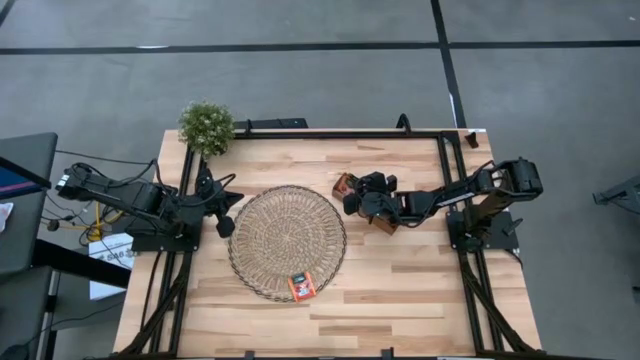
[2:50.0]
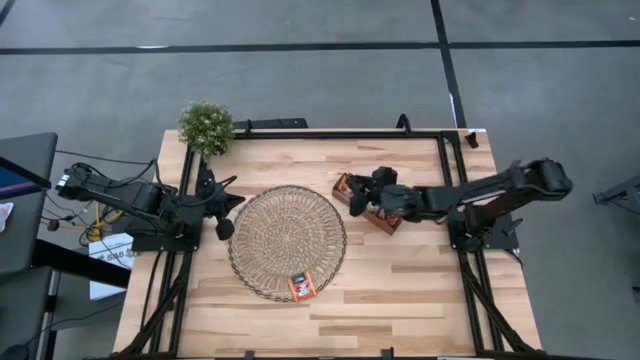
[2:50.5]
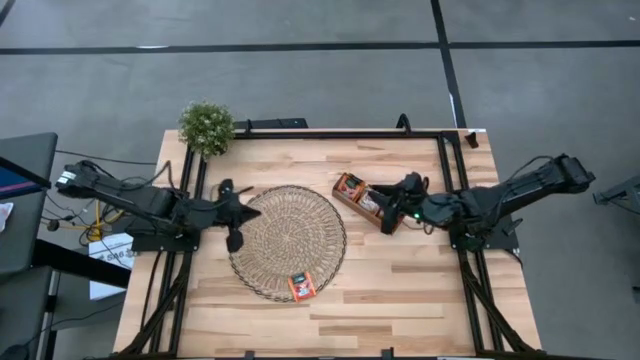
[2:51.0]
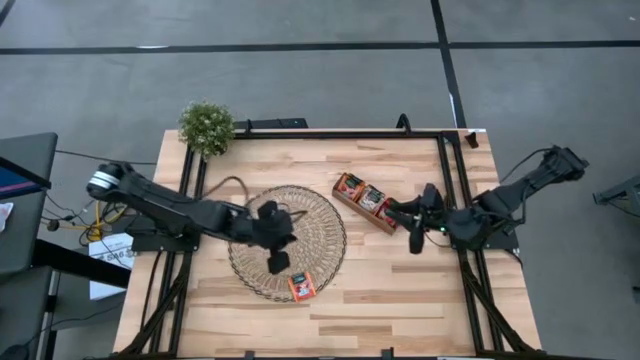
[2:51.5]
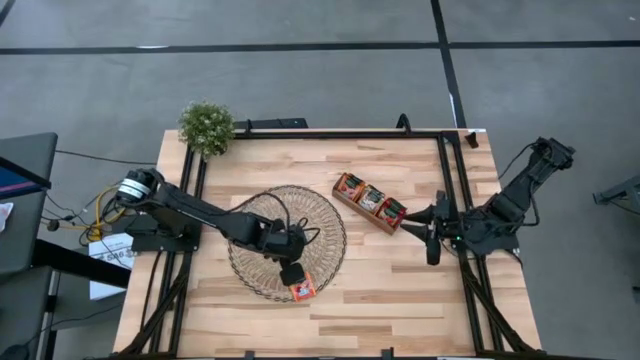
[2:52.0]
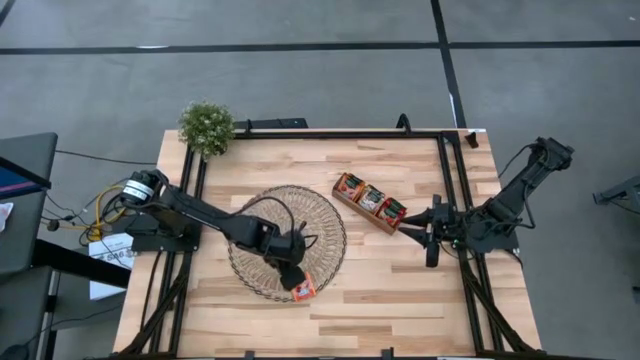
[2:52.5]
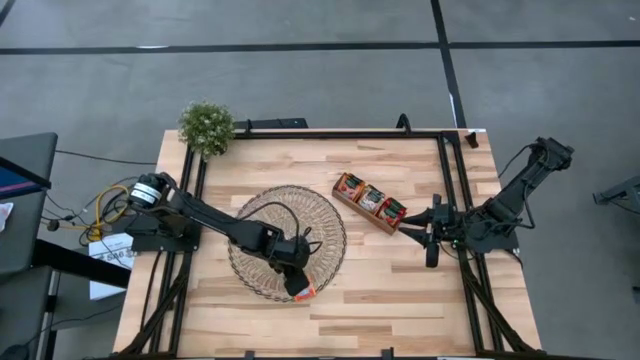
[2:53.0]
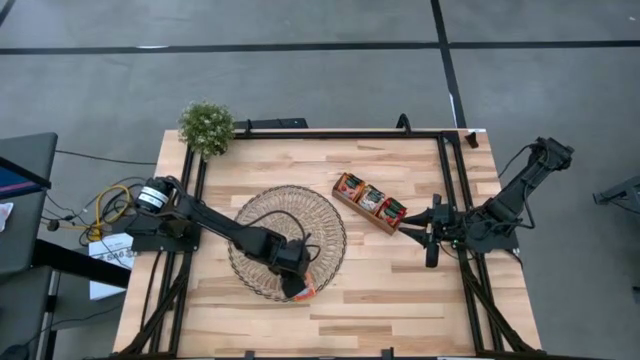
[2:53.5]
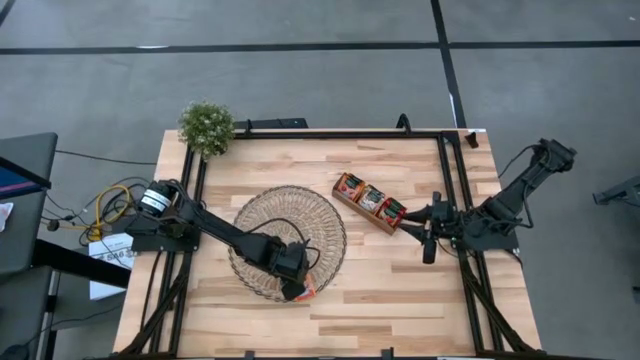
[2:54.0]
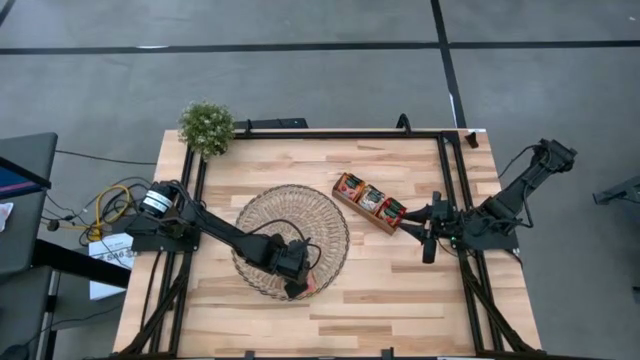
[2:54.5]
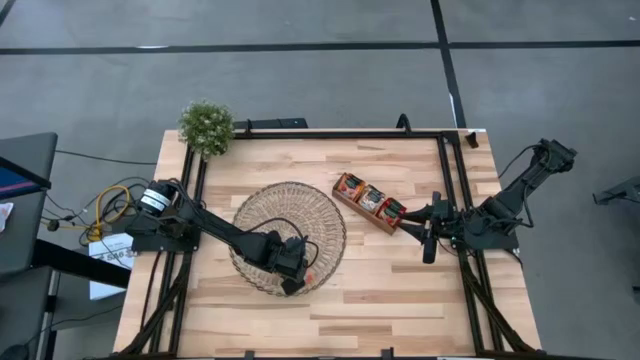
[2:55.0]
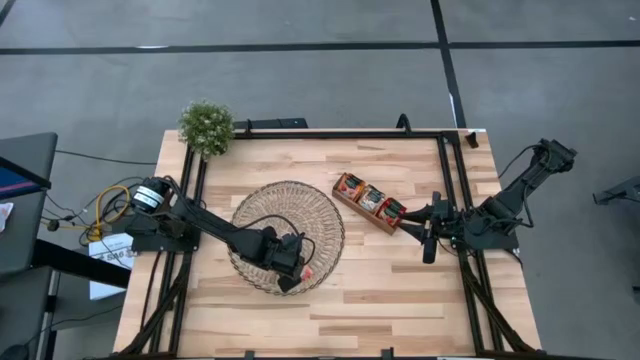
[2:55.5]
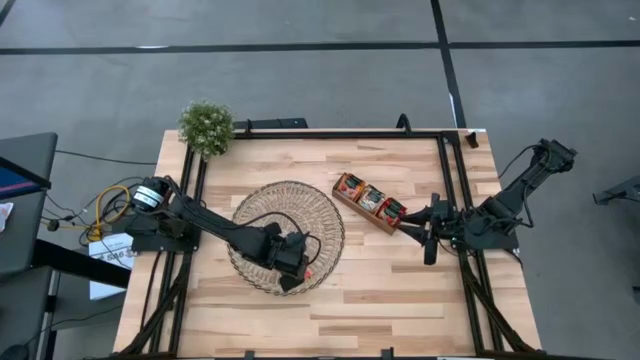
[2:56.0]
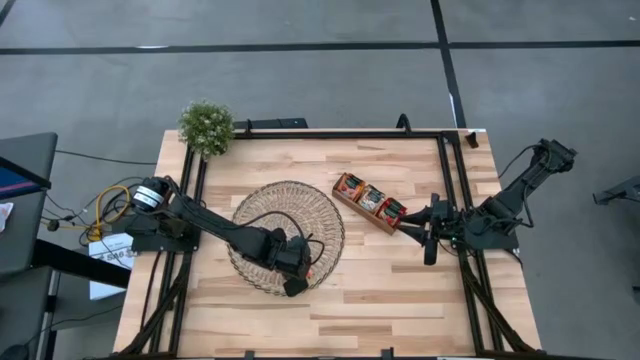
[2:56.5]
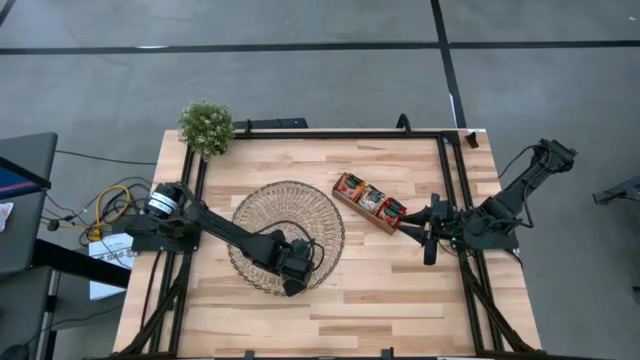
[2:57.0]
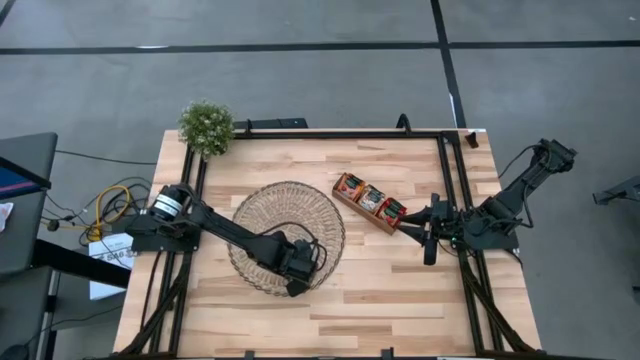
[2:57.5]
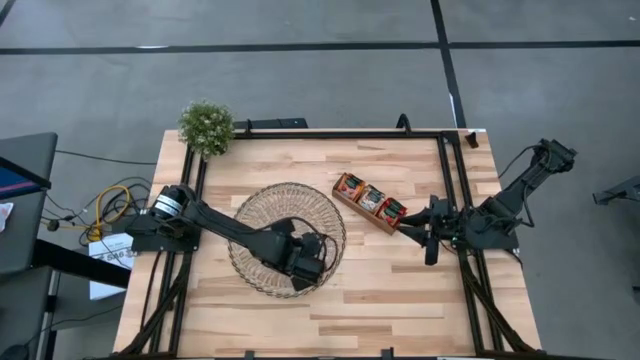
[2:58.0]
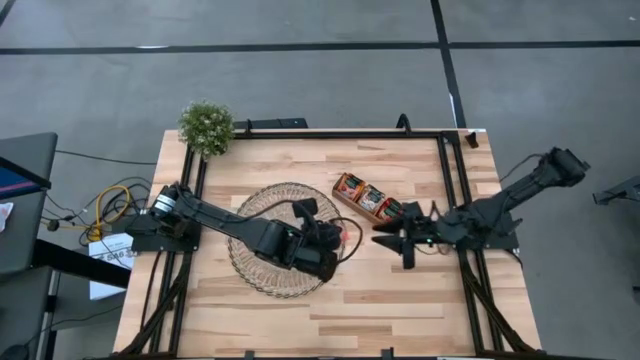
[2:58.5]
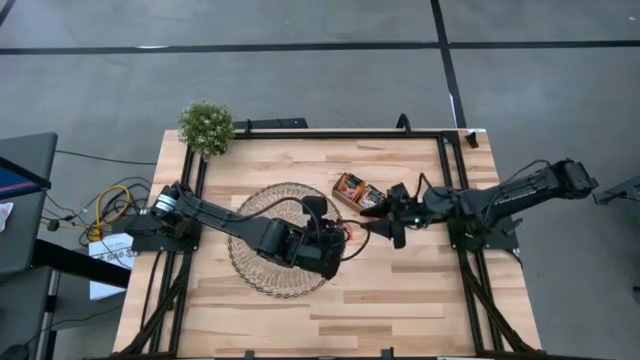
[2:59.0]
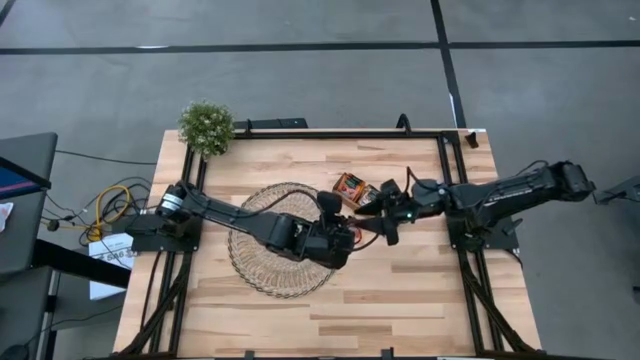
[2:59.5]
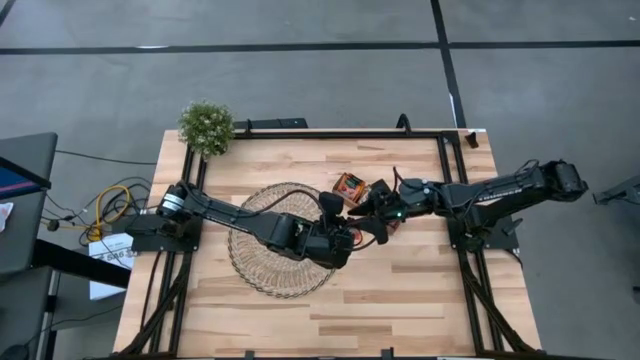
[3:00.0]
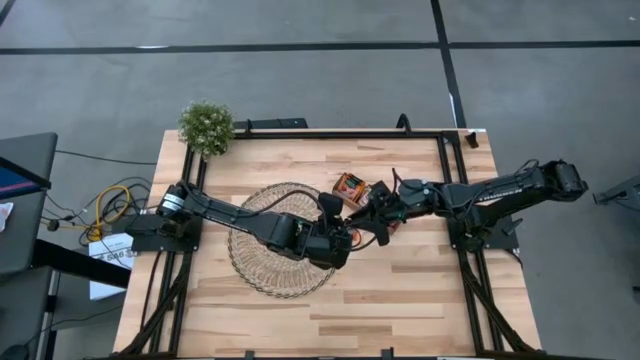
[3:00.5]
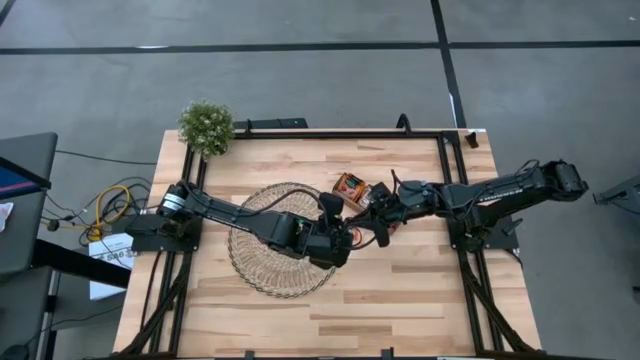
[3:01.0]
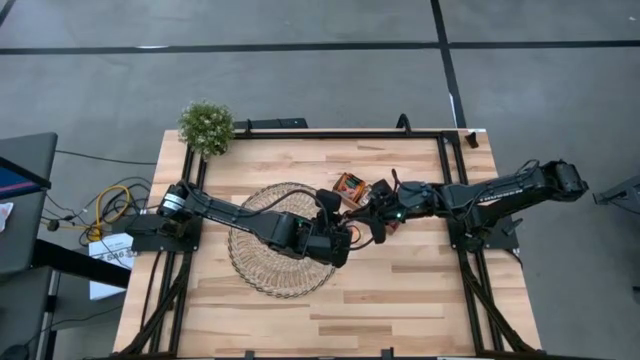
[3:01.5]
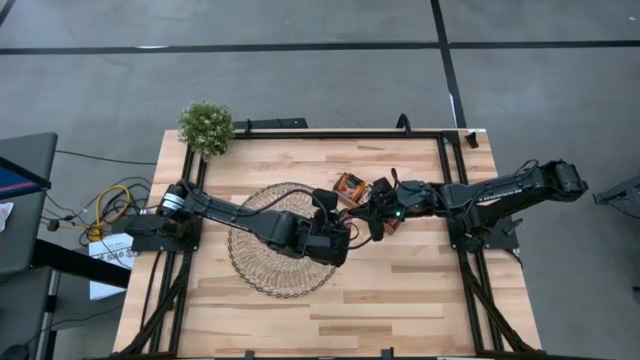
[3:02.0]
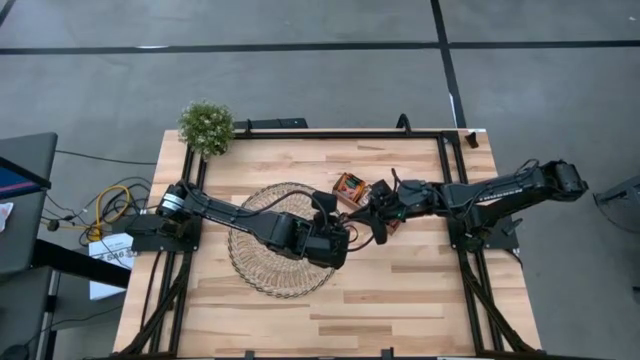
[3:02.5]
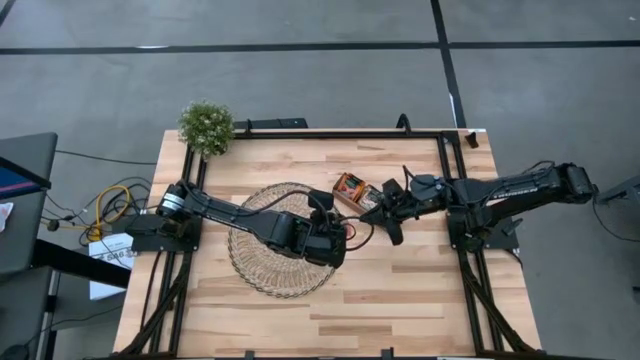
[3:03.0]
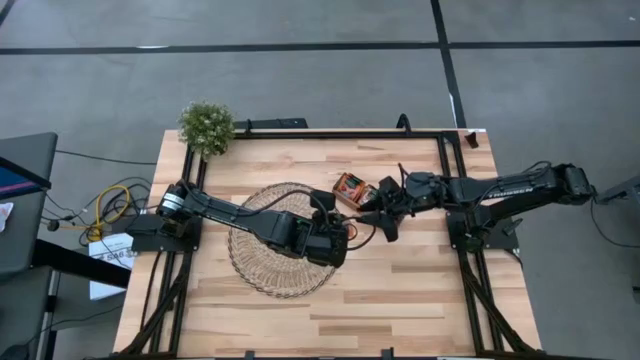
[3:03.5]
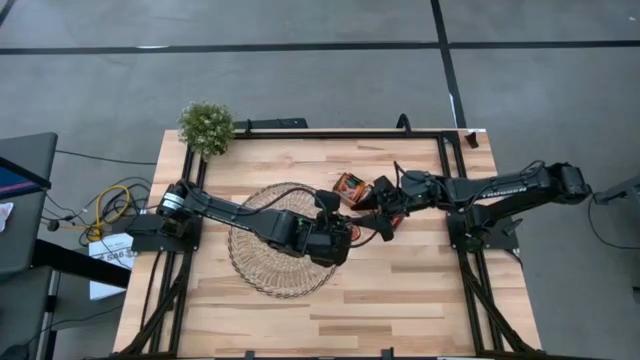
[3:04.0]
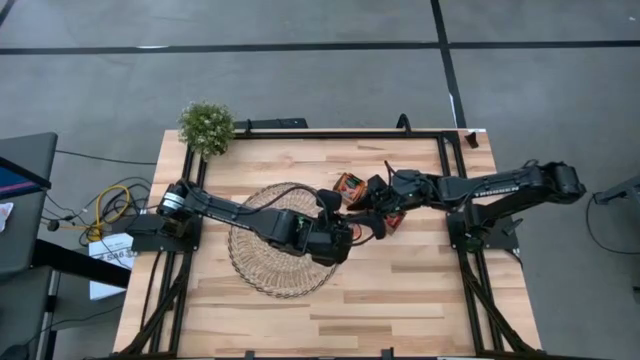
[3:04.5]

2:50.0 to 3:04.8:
Task: Pick & Place Tea
Put the orange tea bag into the left section of the wooden organizer

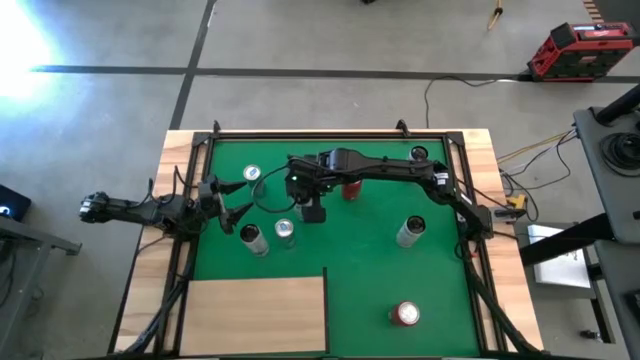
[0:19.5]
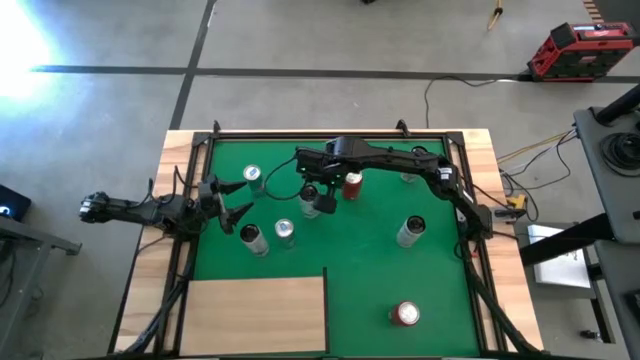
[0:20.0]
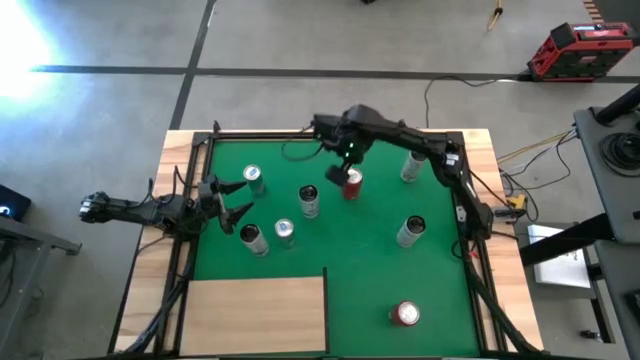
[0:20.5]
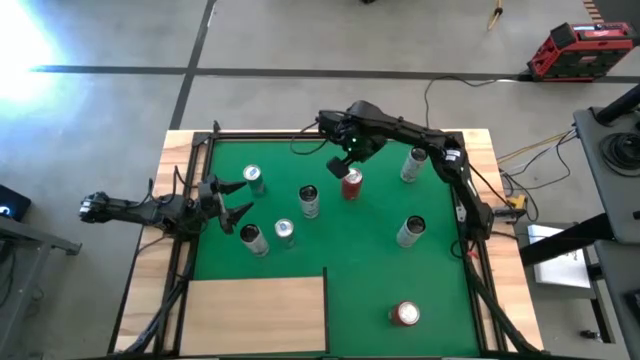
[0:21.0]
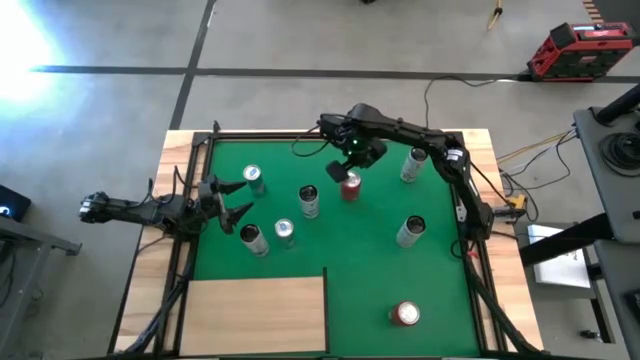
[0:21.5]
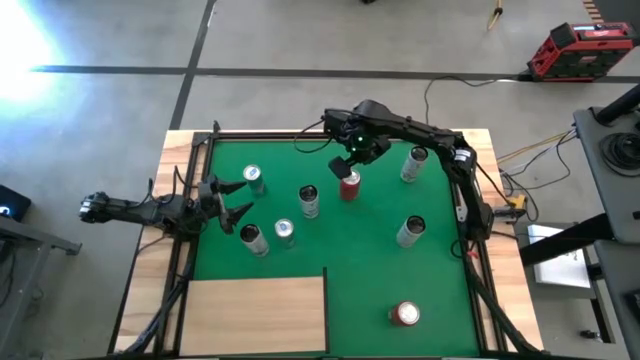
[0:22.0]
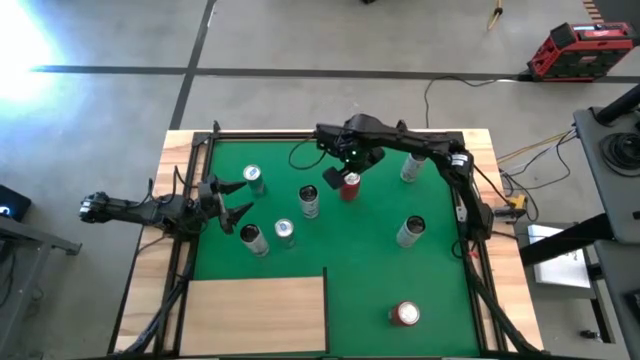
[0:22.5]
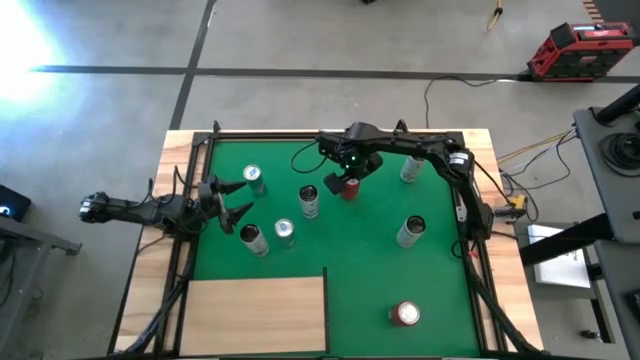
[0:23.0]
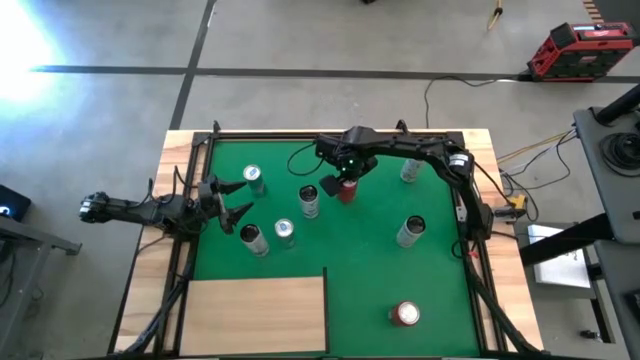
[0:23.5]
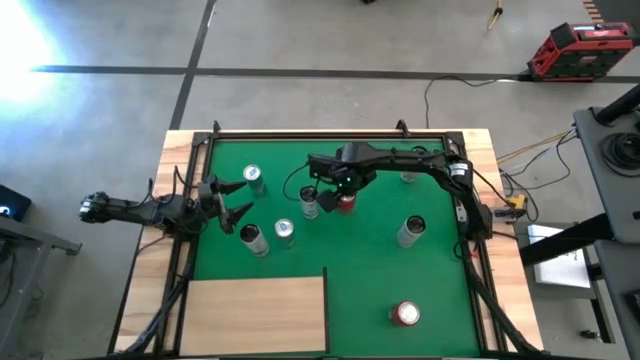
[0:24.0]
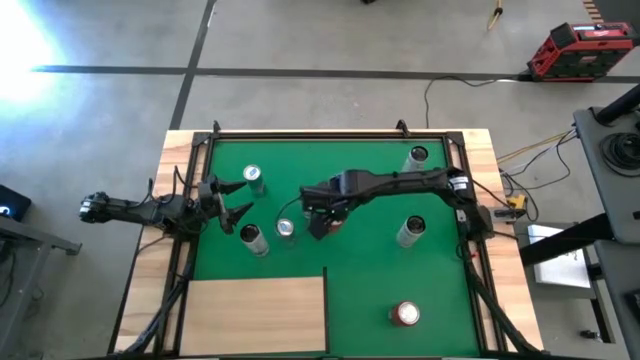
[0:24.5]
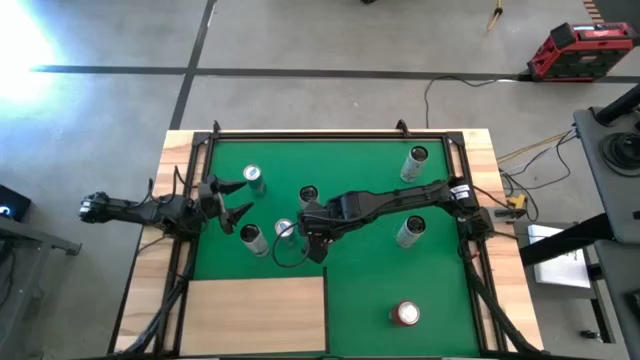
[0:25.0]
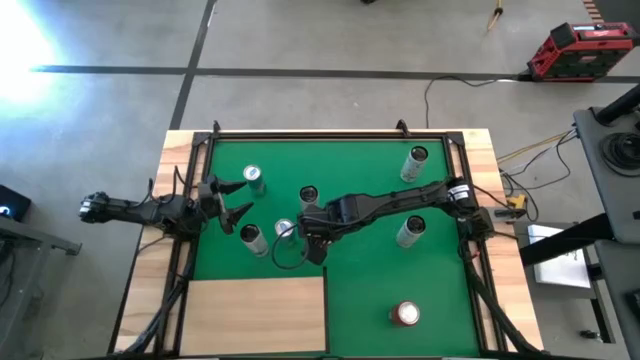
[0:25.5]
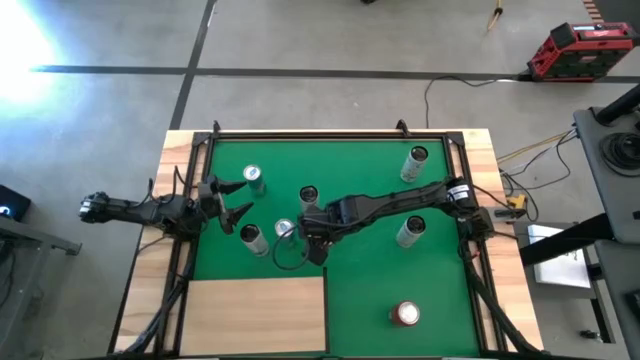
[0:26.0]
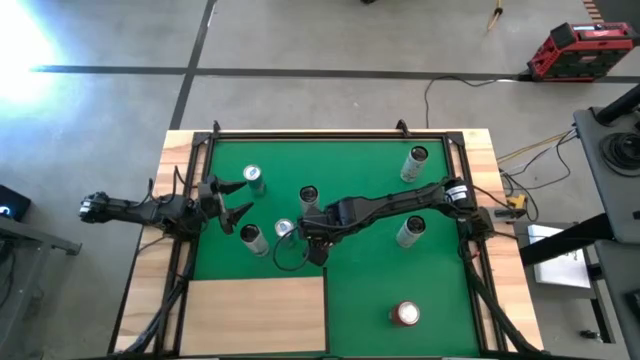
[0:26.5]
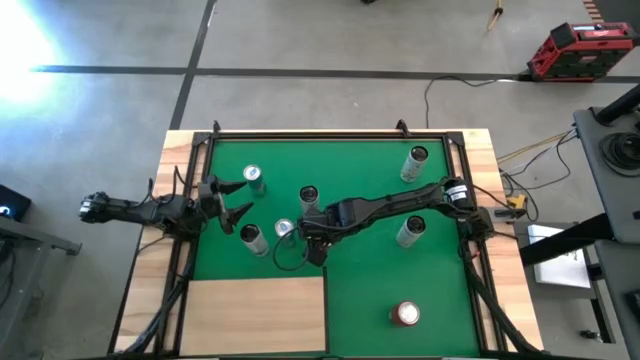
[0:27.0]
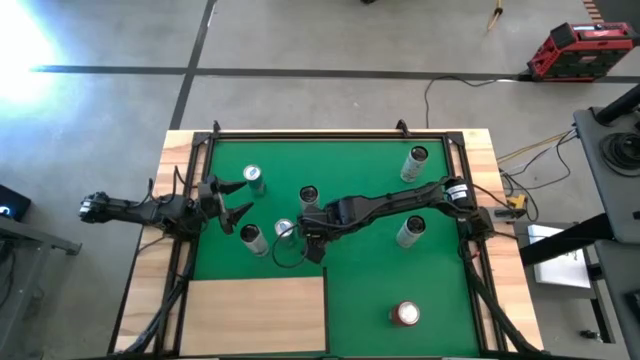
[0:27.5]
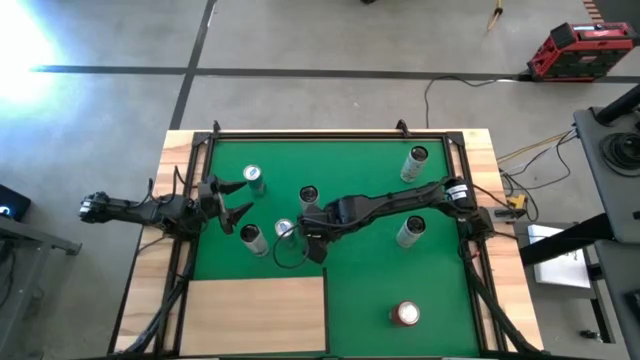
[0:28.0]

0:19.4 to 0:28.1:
Task: Place canned beverage on shelf
Move the top red soda can to the center of the table
